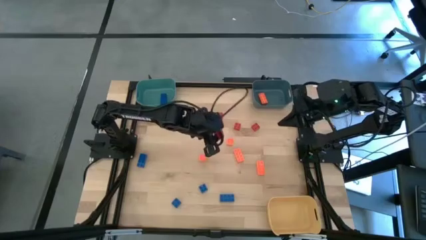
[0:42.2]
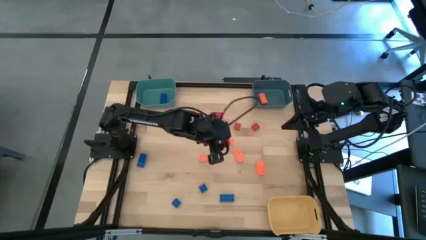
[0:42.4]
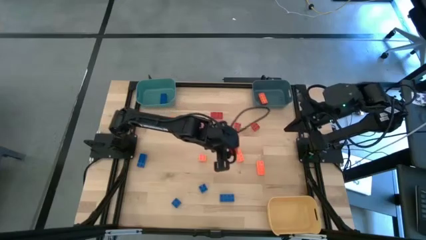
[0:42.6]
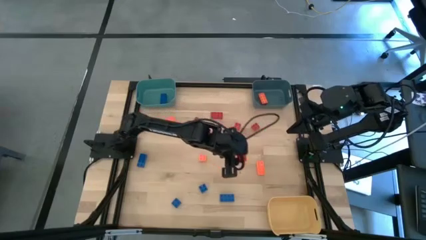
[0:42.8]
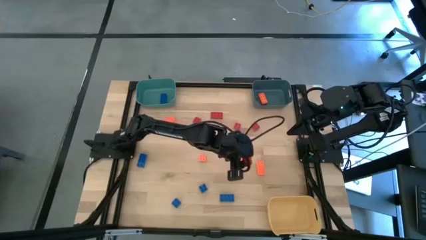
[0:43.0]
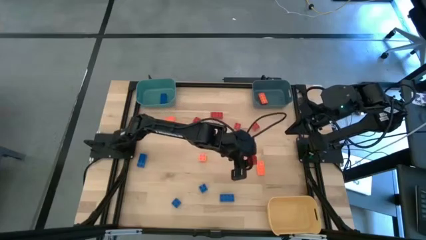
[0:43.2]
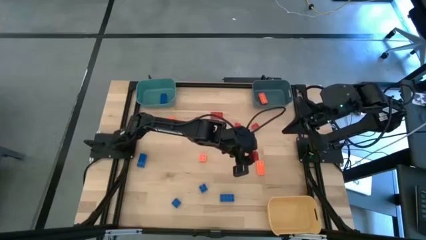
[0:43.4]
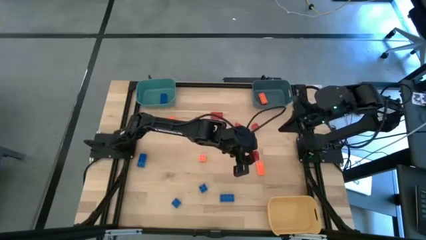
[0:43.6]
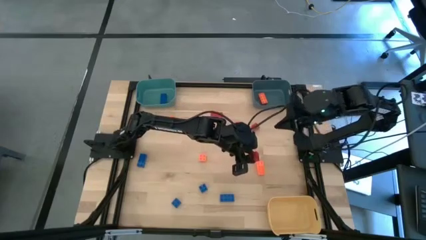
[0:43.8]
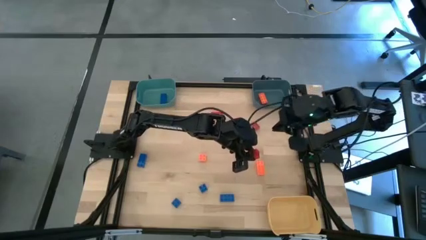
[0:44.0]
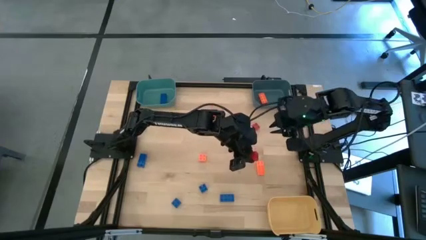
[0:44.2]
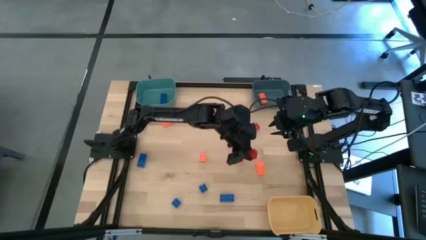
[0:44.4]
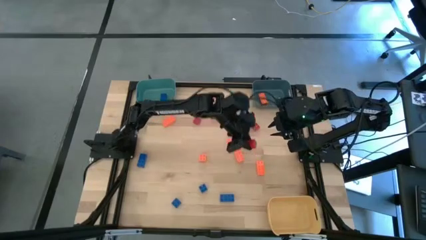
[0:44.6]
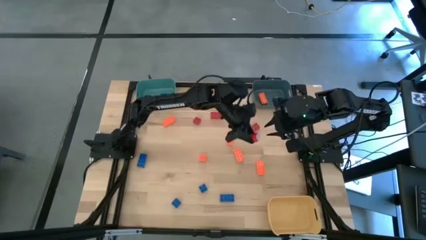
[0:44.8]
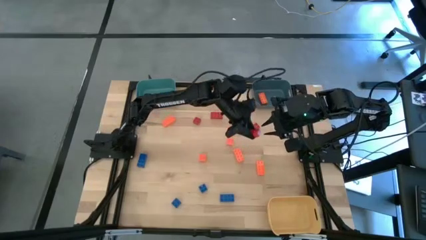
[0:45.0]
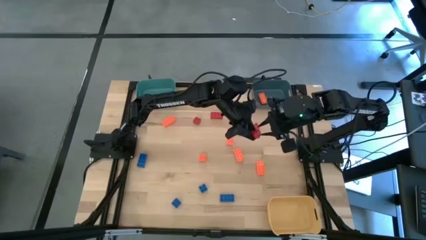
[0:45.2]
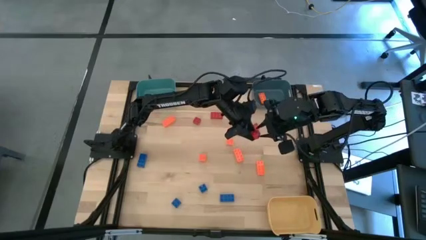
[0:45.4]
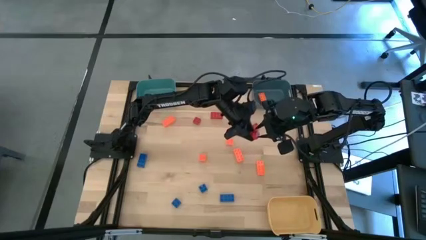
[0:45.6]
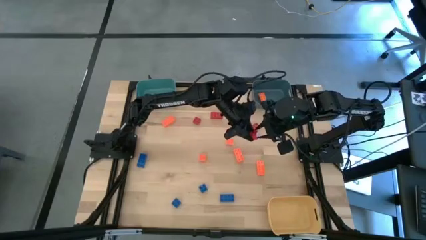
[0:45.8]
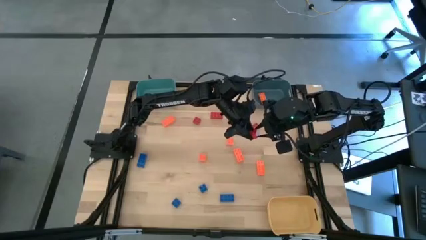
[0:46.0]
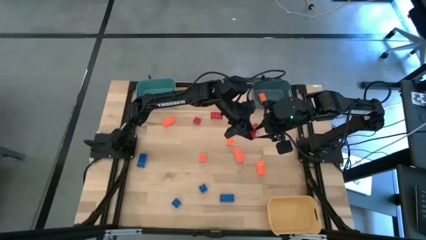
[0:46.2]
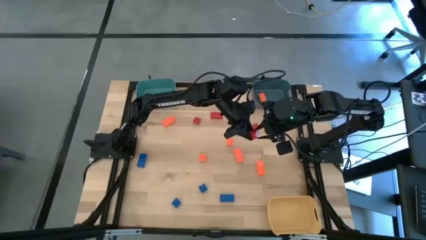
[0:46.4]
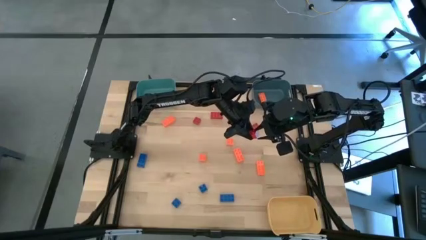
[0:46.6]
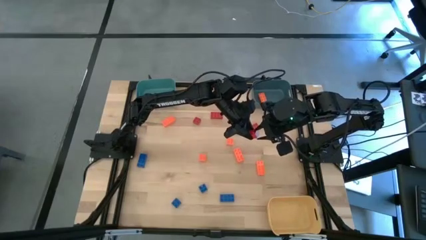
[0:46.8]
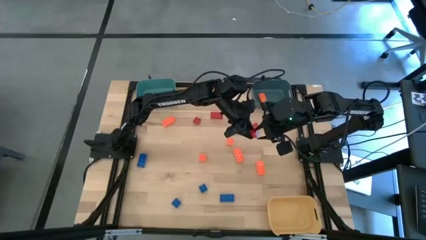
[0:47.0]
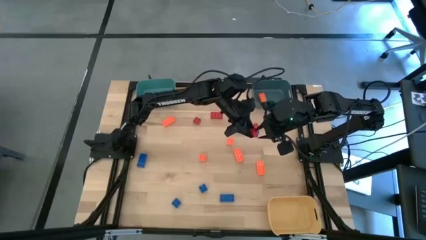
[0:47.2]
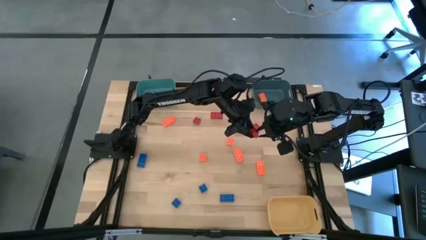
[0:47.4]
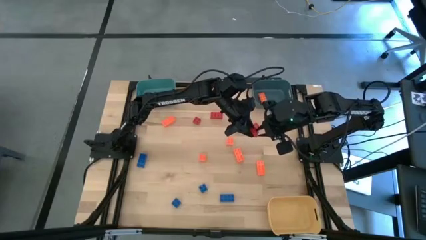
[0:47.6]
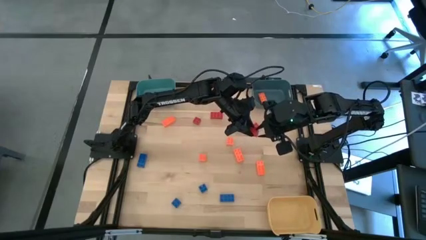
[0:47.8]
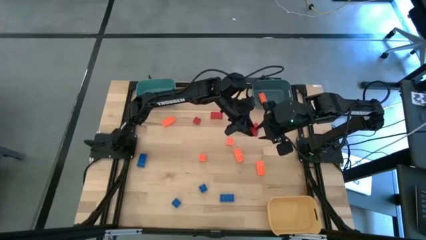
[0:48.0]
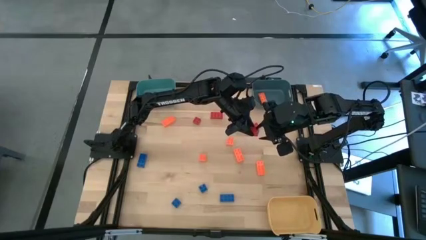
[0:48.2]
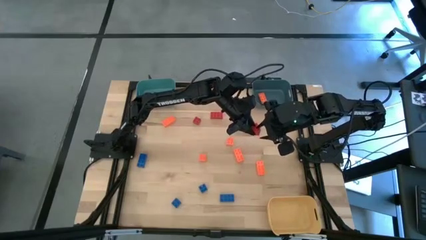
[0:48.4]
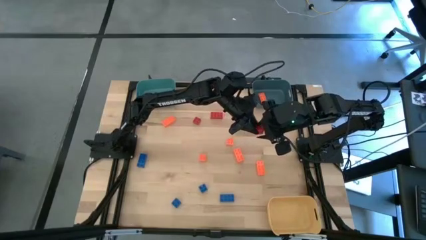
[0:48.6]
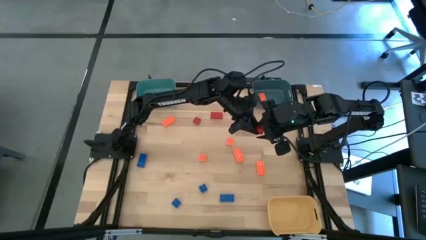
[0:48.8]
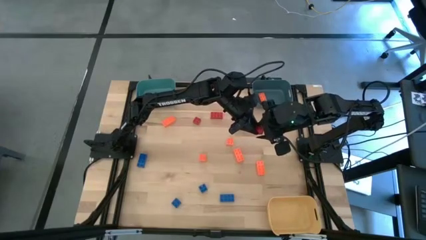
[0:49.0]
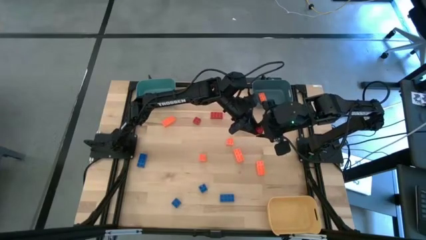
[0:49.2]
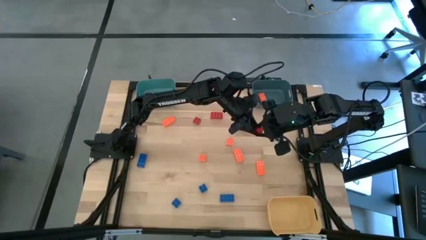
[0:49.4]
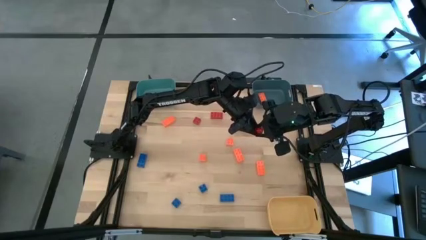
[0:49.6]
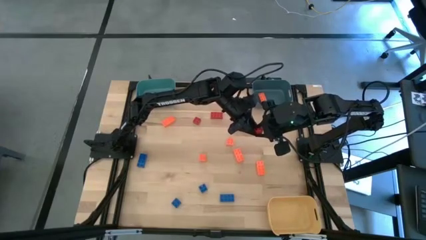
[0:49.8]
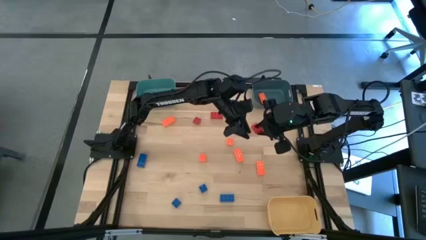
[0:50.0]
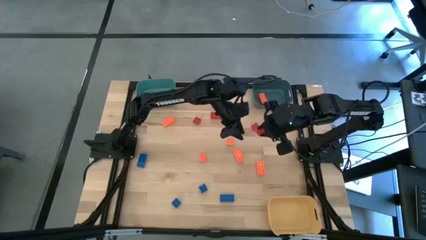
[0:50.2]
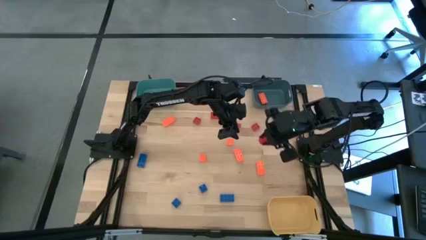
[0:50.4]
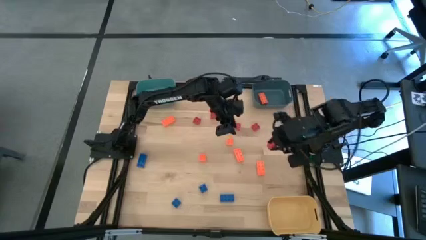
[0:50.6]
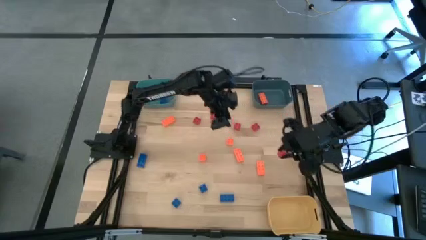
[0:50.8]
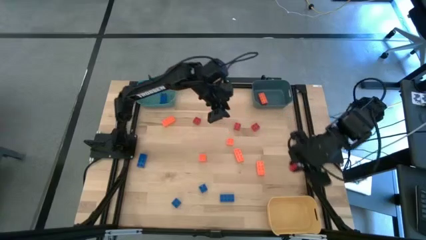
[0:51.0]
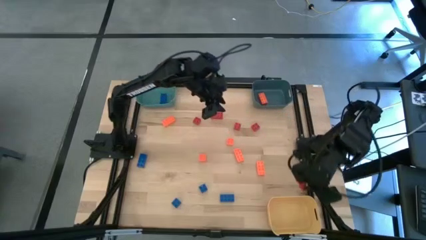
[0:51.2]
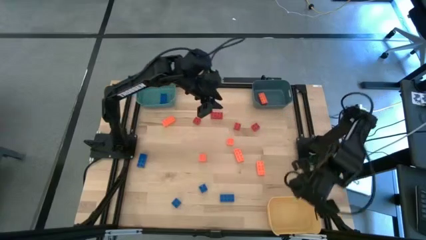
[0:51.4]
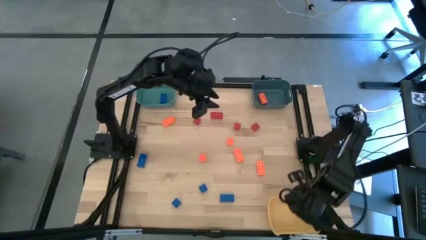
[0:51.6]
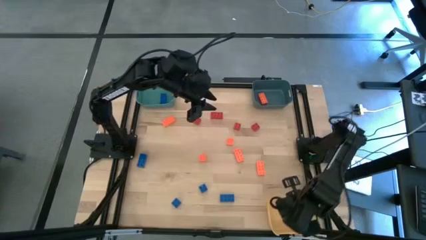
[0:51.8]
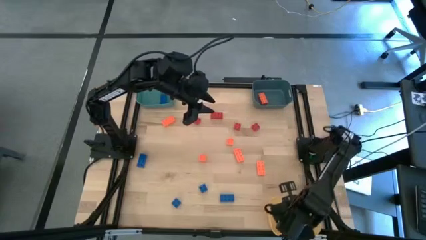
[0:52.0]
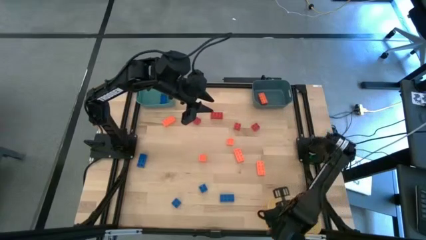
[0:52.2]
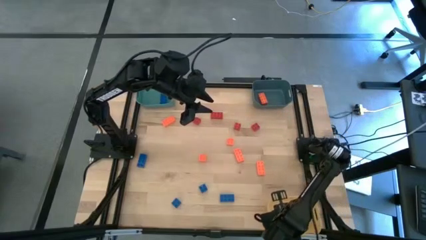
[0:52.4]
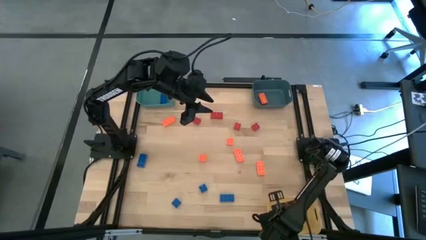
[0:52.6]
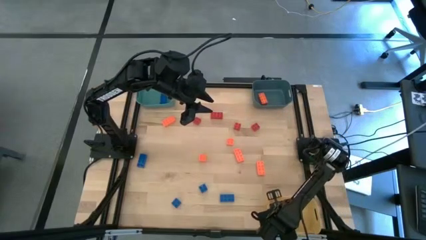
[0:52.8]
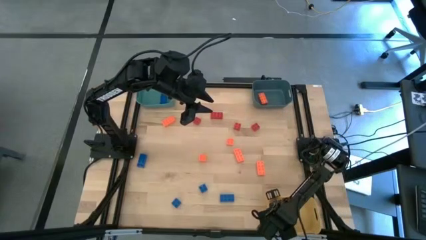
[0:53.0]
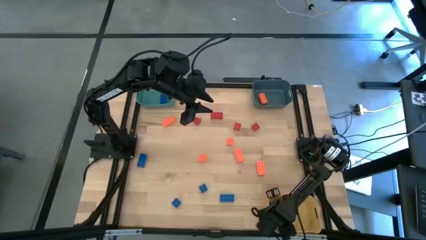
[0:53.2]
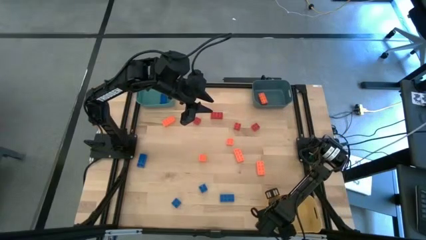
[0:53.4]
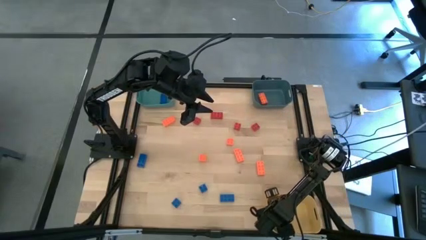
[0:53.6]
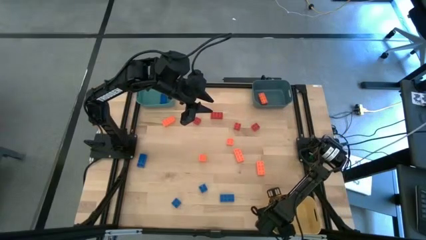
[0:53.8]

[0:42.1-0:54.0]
Task: Sort & place blocks by color
Put the red game piece into the yellow bin
